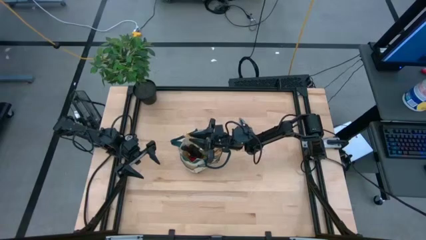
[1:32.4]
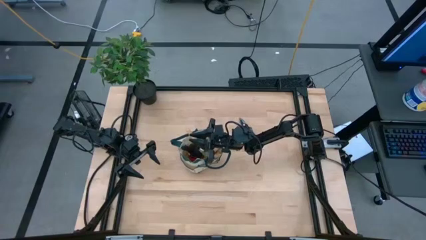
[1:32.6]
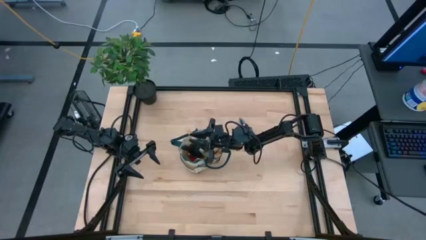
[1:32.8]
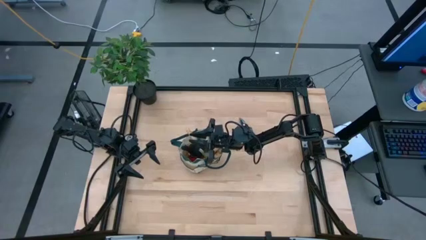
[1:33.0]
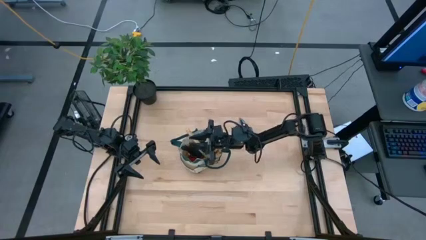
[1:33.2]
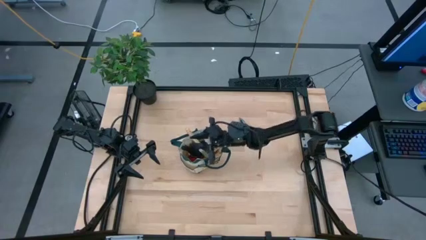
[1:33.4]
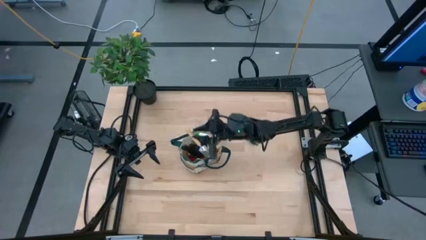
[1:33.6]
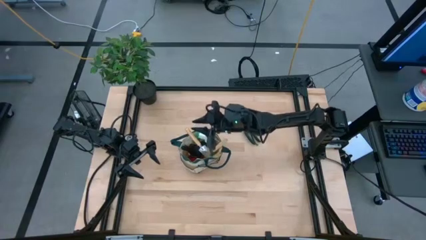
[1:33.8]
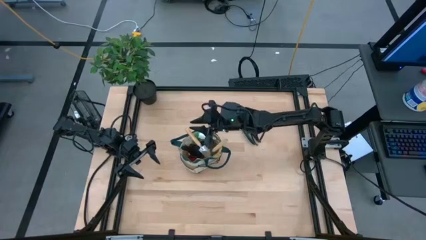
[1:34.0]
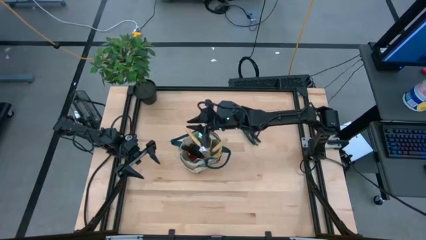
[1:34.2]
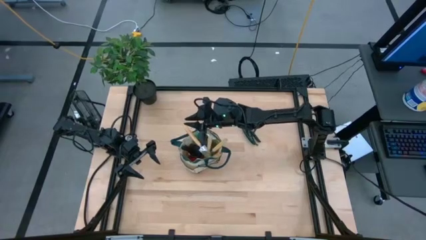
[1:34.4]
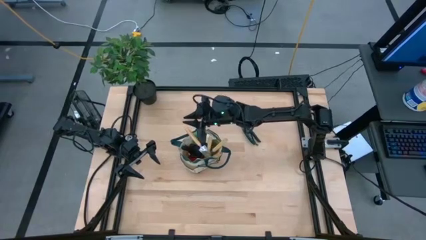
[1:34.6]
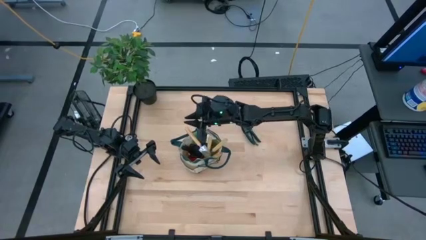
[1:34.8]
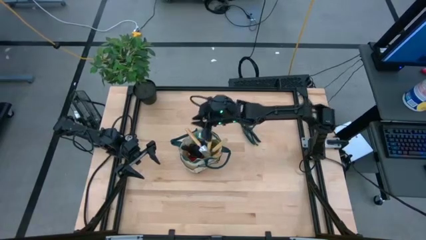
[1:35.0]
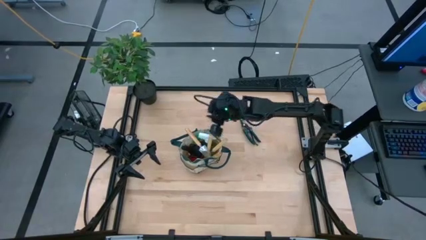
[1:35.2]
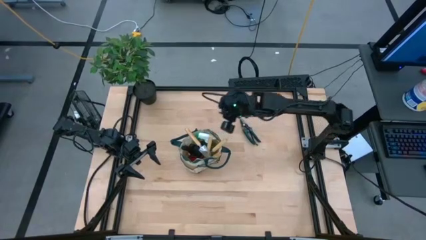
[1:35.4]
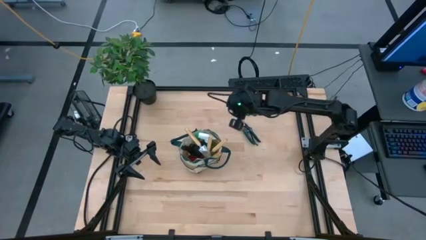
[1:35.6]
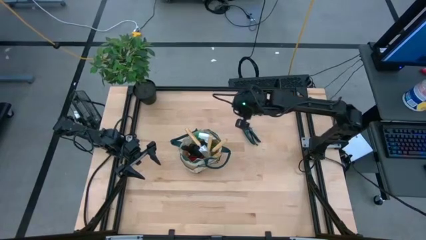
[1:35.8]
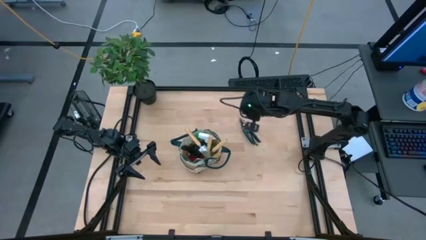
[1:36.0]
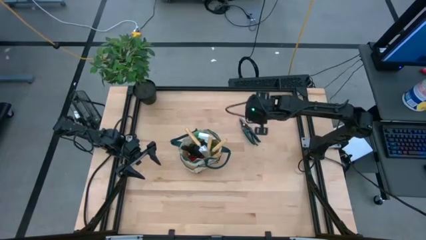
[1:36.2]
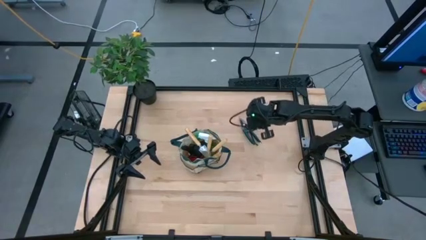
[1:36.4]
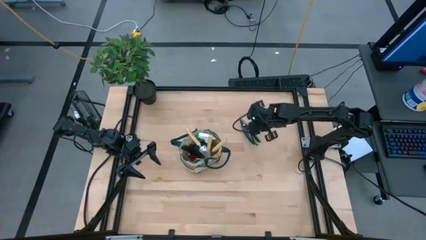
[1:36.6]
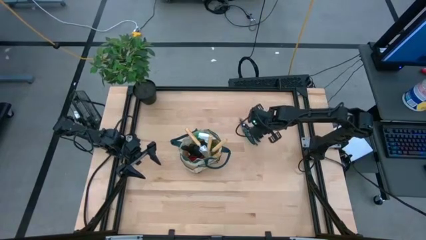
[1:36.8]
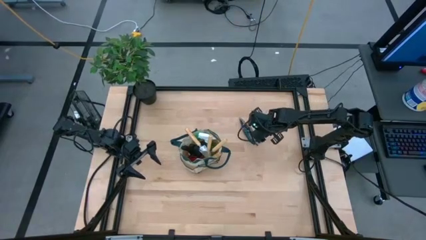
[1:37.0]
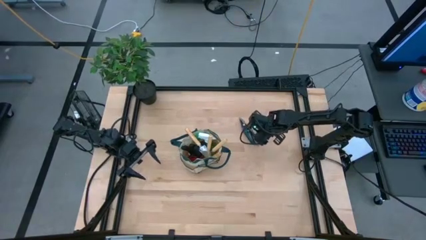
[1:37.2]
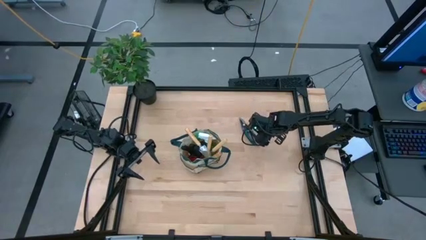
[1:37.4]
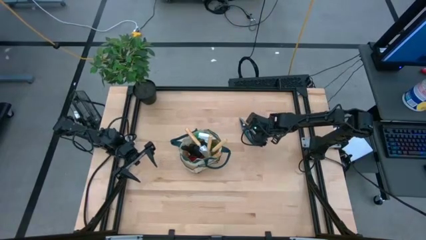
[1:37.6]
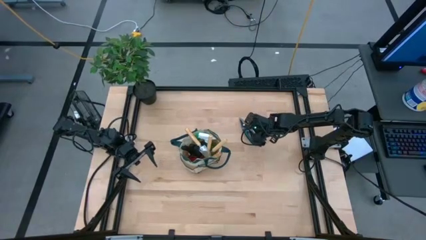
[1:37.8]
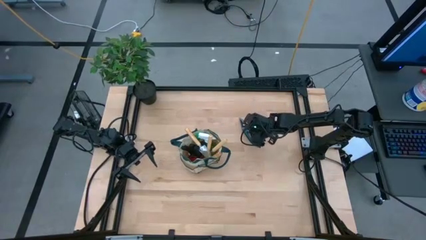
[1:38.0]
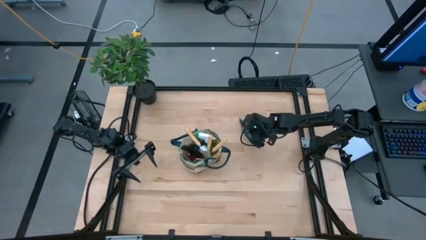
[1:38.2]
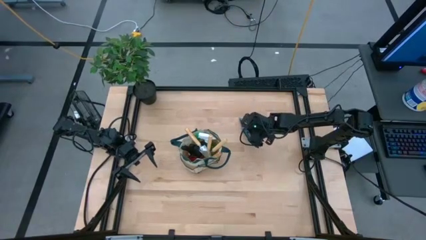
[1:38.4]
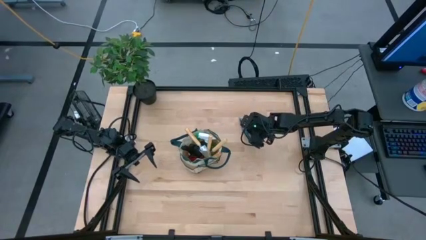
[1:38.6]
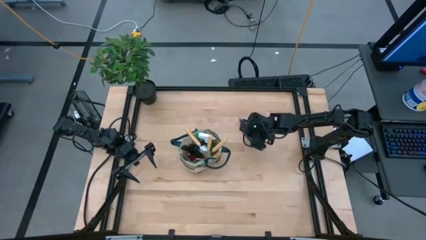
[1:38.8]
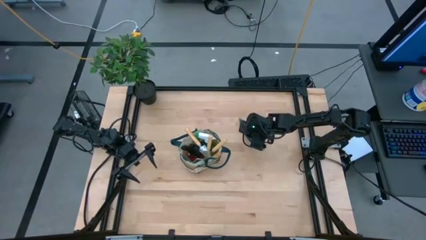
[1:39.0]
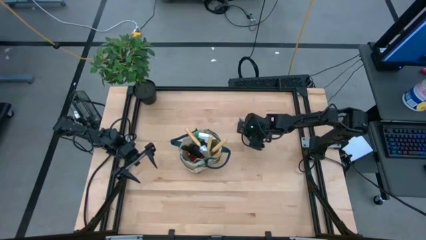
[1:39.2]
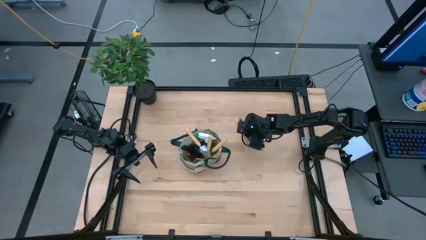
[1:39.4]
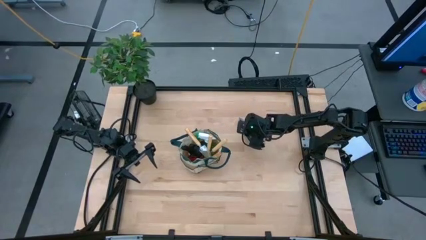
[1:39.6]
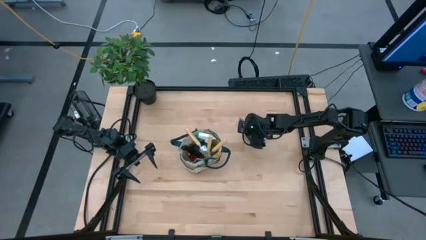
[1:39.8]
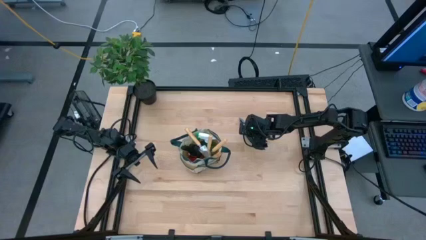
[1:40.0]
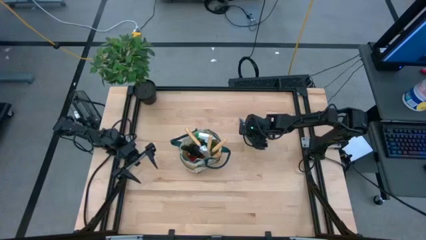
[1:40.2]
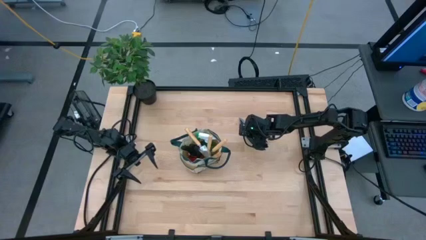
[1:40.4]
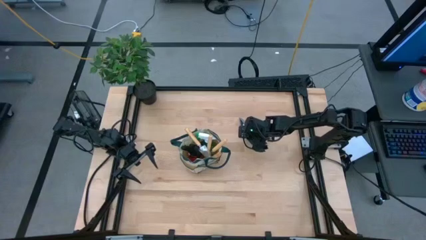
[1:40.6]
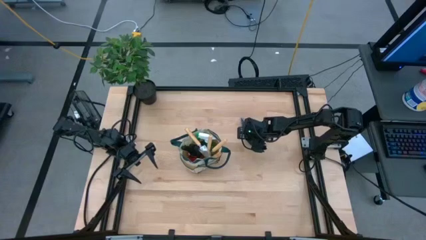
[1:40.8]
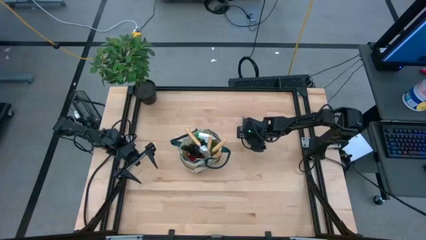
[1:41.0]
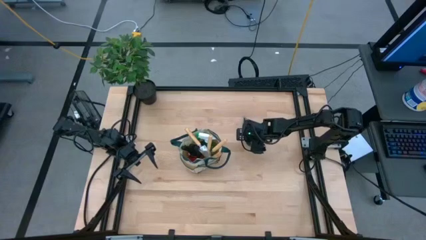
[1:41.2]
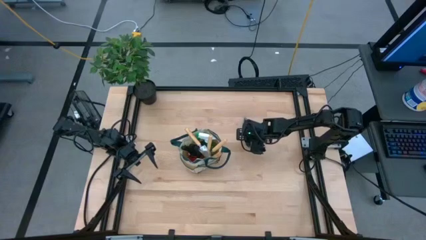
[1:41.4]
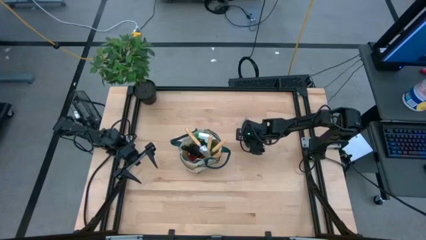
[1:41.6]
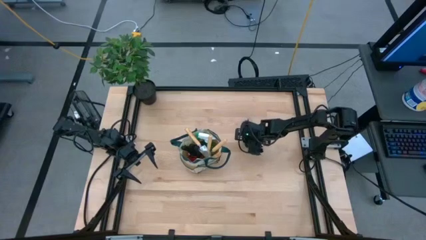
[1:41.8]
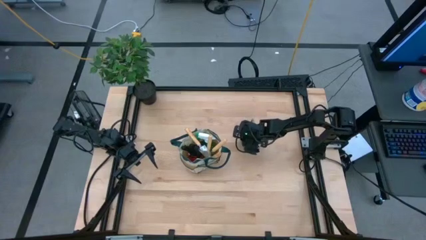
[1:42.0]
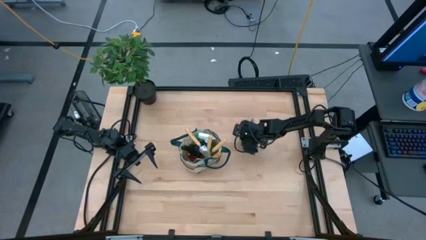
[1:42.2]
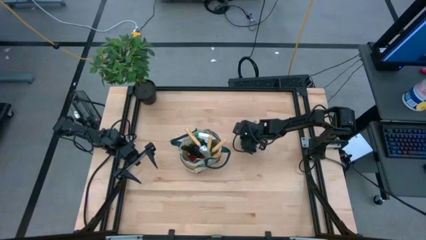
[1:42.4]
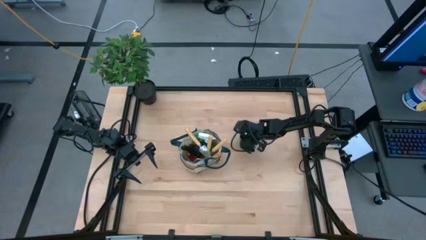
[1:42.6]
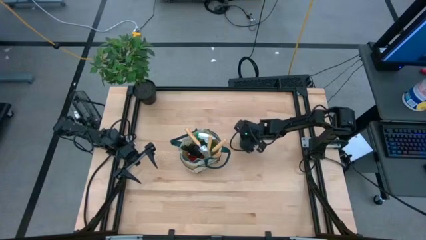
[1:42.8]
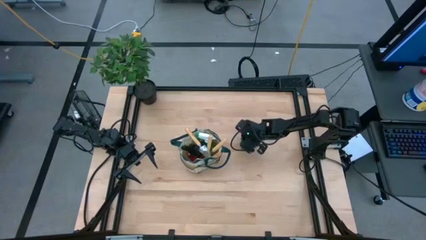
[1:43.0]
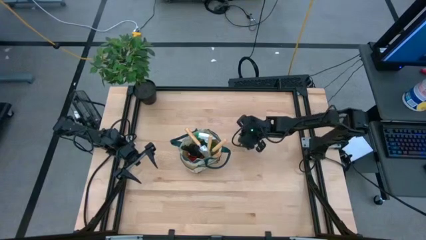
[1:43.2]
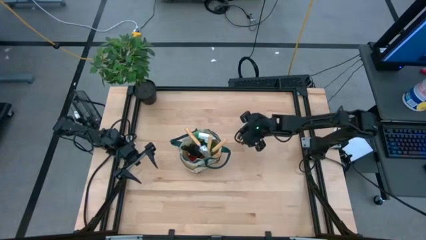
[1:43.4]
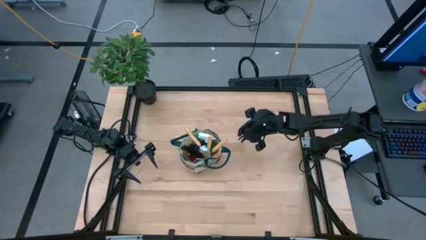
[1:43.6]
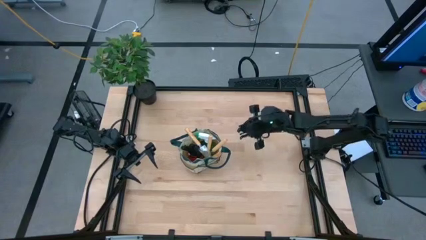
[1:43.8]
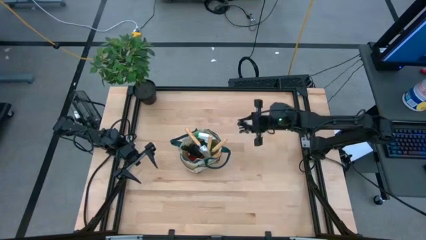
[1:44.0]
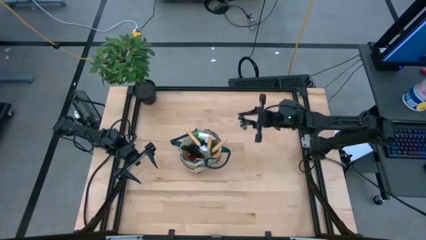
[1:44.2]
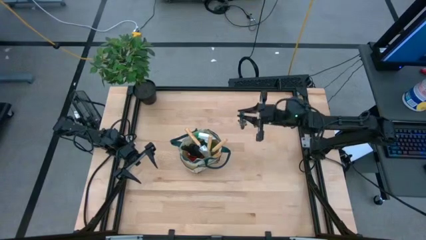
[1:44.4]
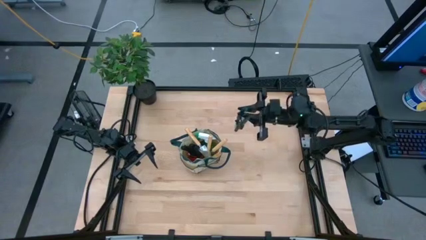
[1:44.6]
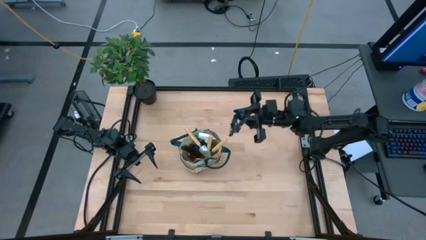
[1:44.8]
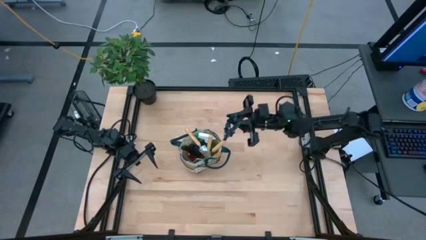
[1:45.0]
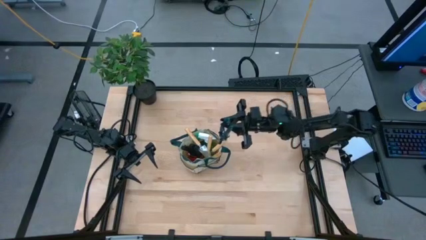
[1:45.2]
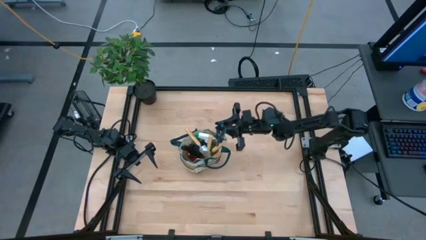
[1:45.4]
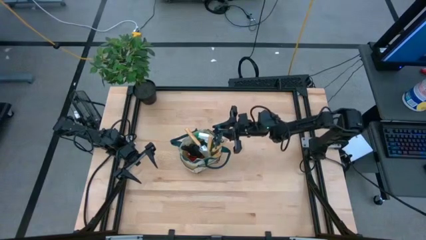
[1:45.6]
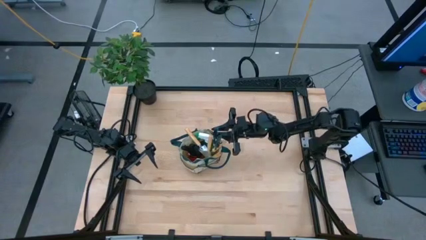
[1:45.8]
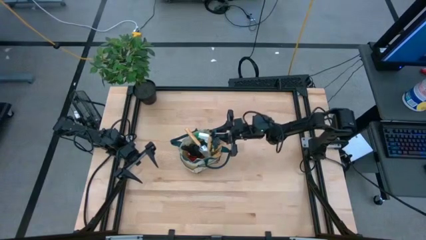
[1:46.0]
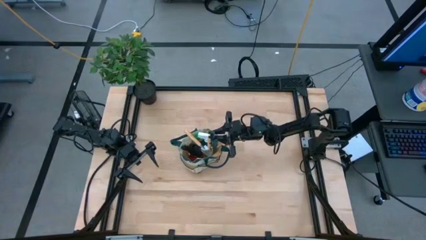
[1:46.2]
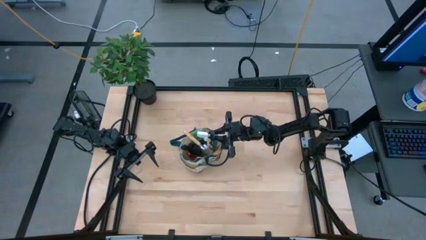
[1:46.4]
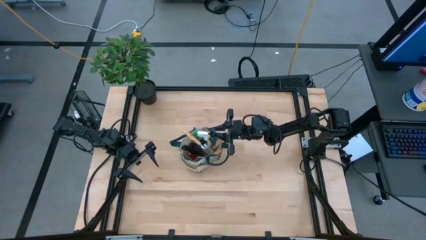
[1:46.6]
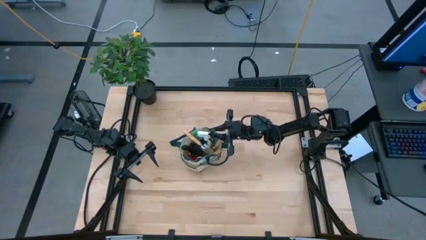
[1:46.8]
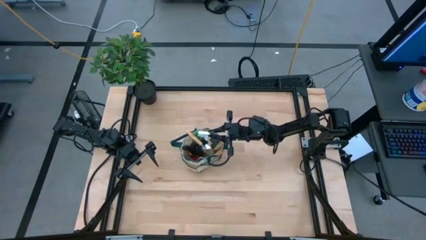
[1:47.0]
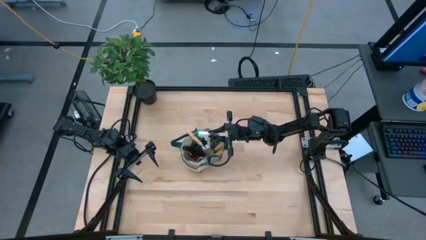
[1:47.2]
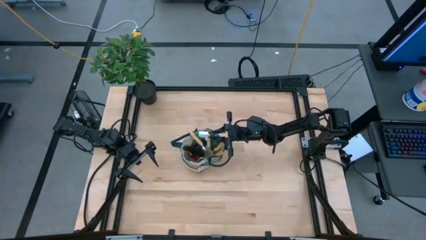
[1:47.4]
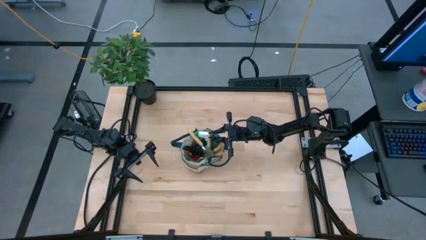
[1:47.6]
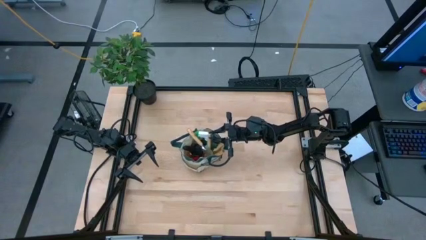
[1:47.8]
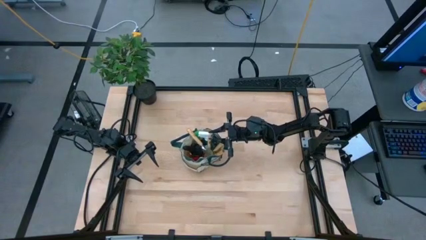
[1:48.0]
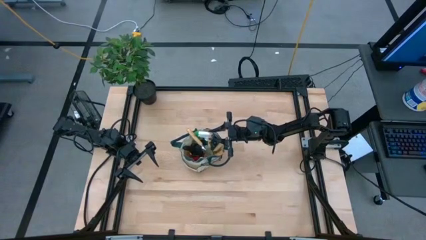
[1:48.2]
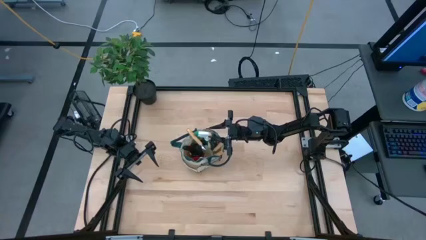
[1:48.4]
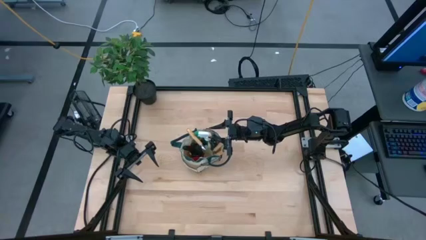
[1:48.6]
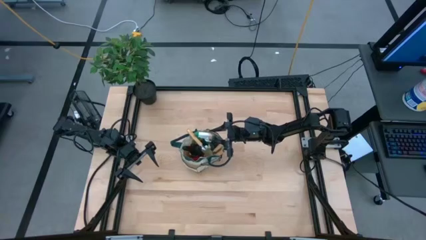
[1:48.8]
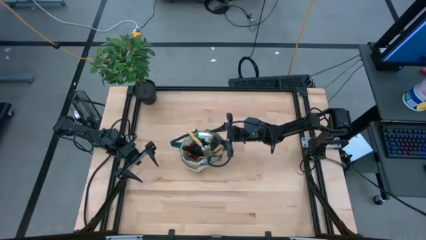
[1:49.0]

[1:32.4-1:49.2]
Task: Pick & Place Garden tools in Gardening bag
Put the green shear scissors into the gardening bag
